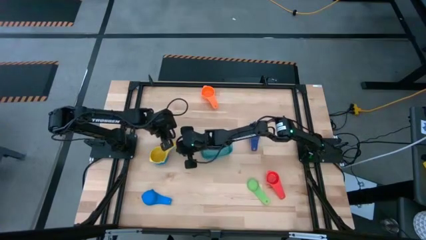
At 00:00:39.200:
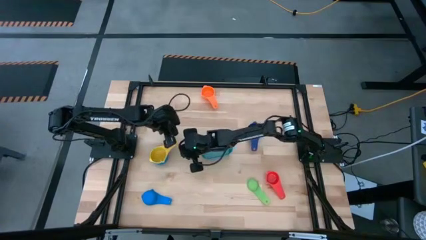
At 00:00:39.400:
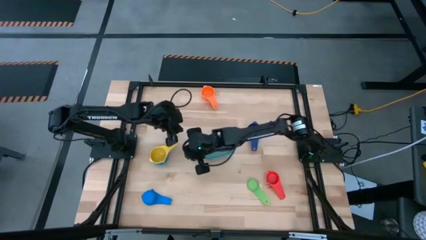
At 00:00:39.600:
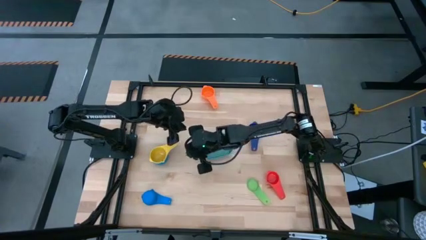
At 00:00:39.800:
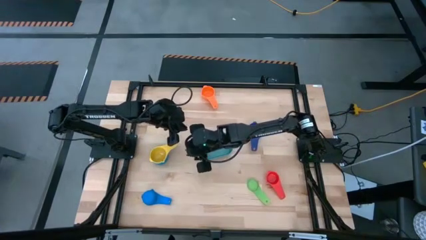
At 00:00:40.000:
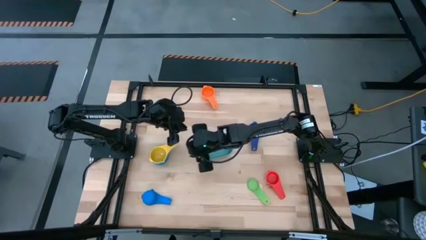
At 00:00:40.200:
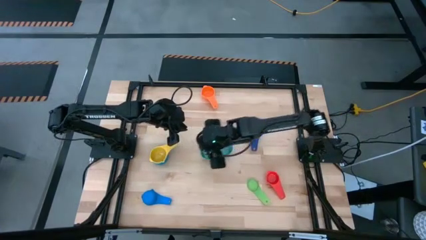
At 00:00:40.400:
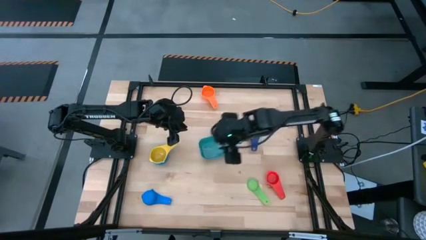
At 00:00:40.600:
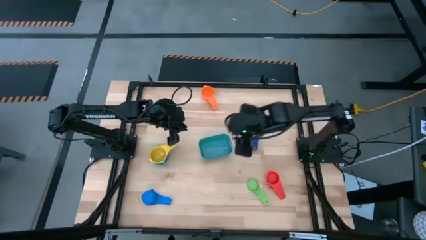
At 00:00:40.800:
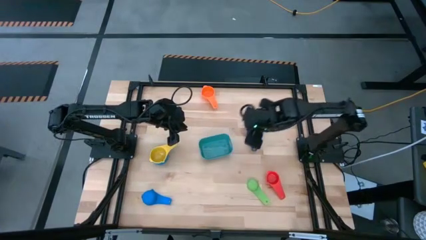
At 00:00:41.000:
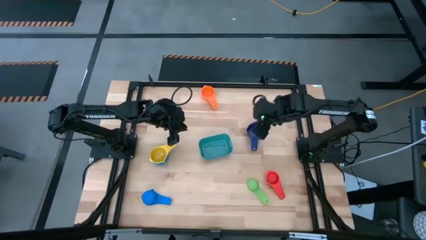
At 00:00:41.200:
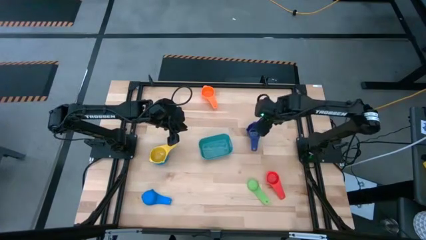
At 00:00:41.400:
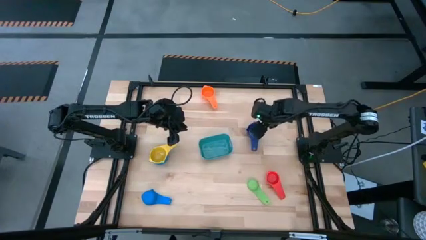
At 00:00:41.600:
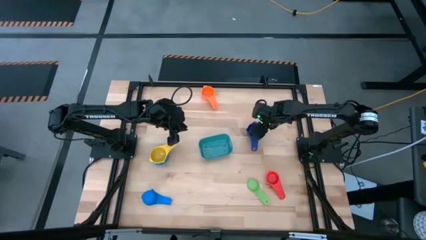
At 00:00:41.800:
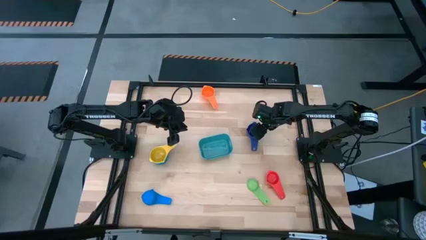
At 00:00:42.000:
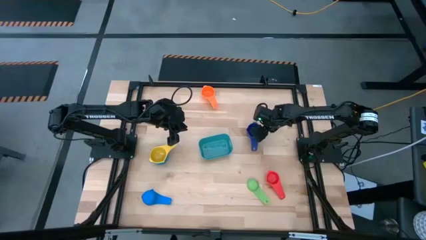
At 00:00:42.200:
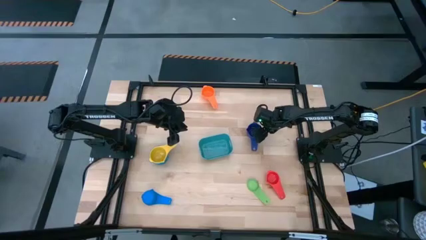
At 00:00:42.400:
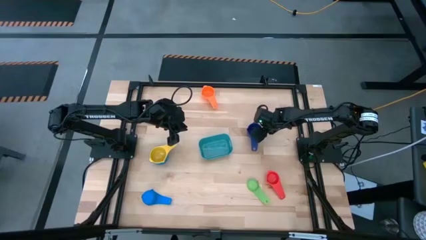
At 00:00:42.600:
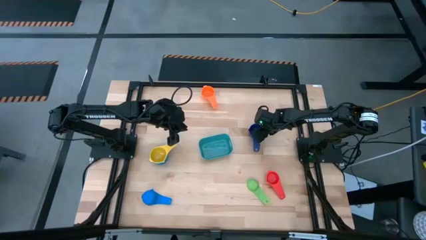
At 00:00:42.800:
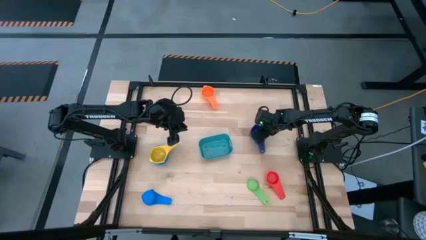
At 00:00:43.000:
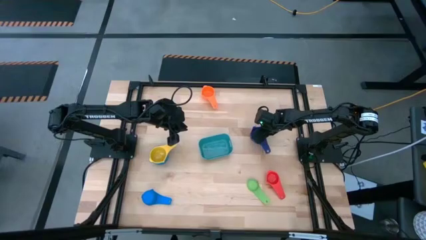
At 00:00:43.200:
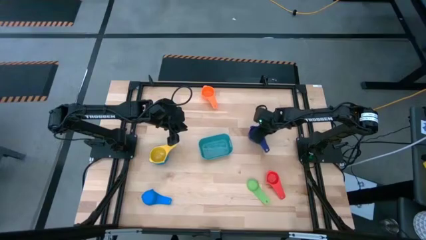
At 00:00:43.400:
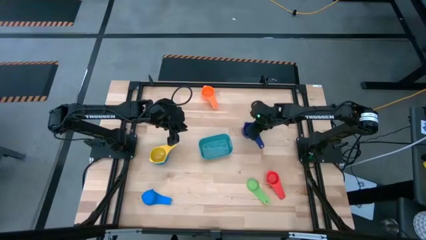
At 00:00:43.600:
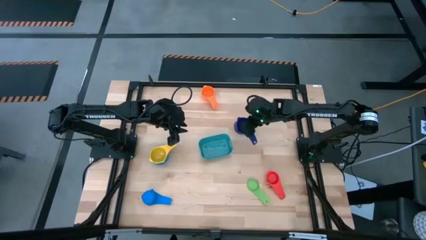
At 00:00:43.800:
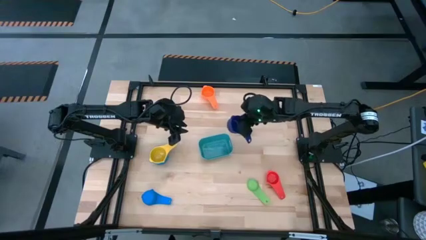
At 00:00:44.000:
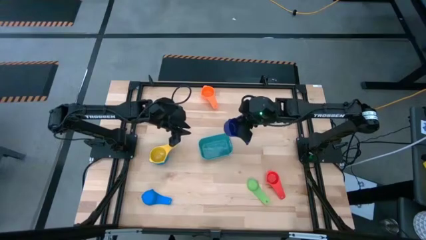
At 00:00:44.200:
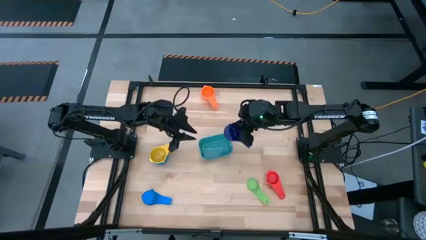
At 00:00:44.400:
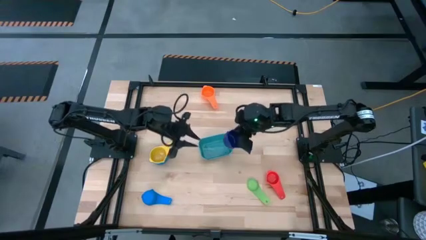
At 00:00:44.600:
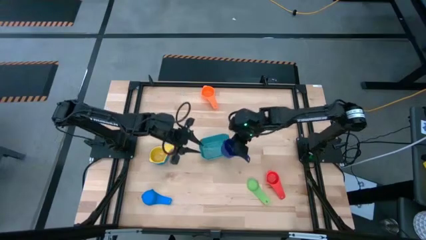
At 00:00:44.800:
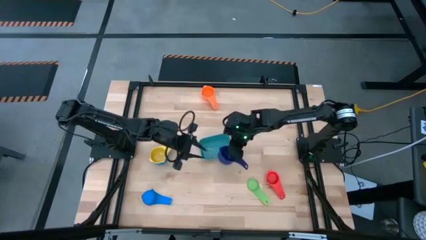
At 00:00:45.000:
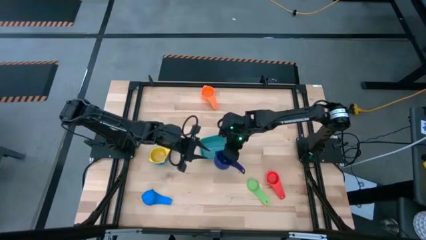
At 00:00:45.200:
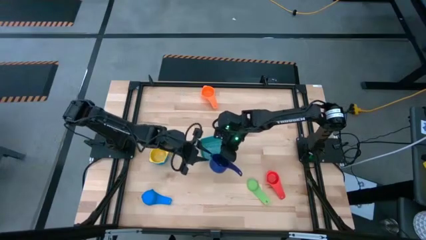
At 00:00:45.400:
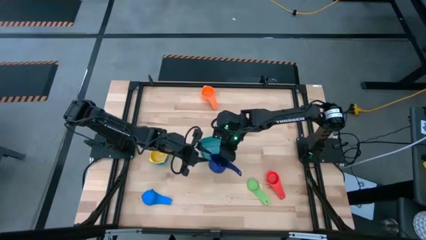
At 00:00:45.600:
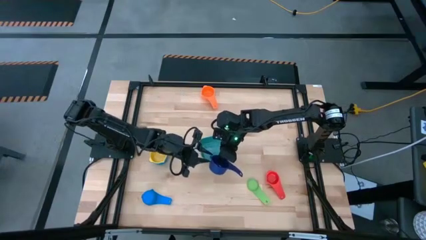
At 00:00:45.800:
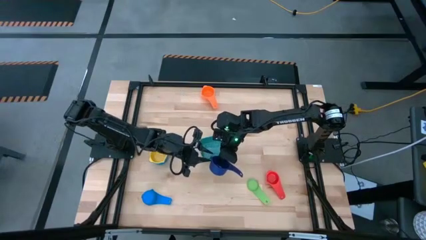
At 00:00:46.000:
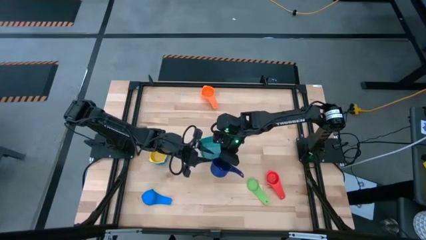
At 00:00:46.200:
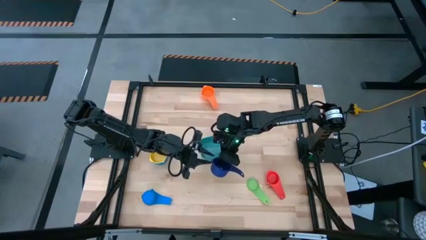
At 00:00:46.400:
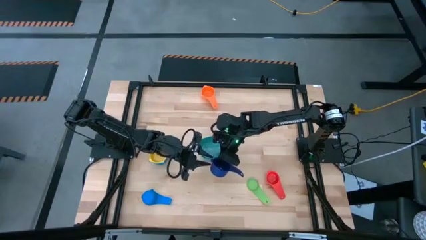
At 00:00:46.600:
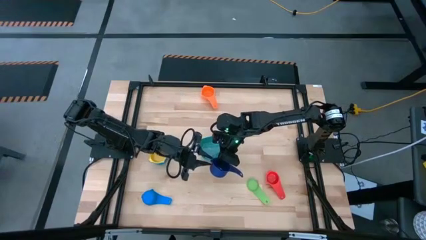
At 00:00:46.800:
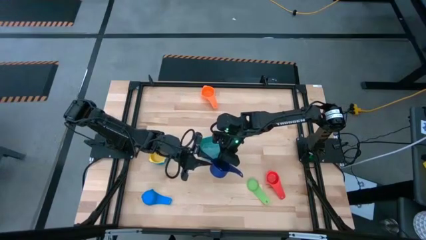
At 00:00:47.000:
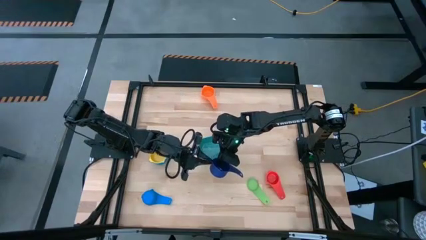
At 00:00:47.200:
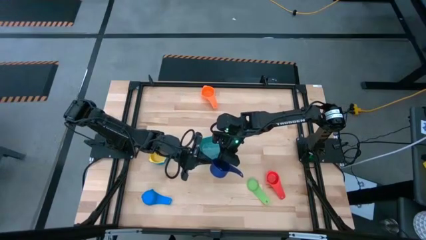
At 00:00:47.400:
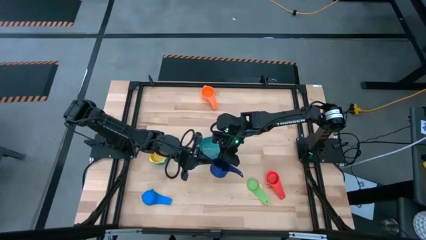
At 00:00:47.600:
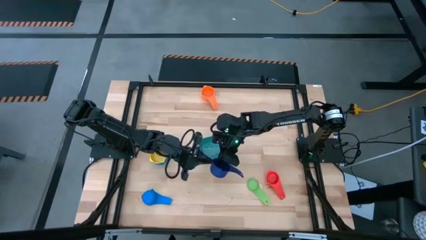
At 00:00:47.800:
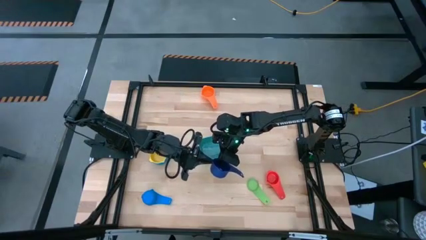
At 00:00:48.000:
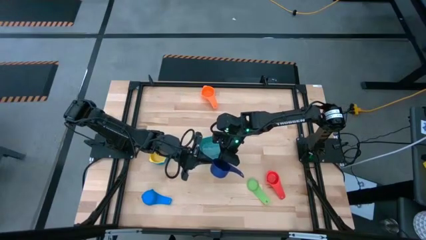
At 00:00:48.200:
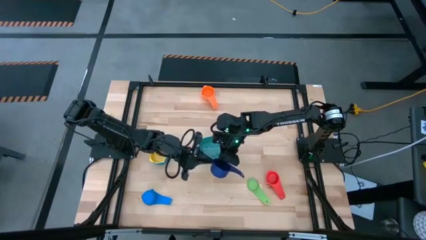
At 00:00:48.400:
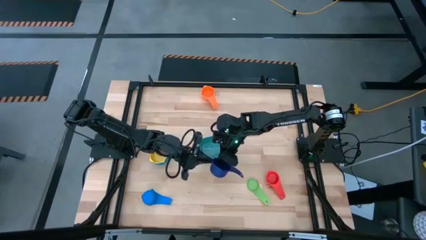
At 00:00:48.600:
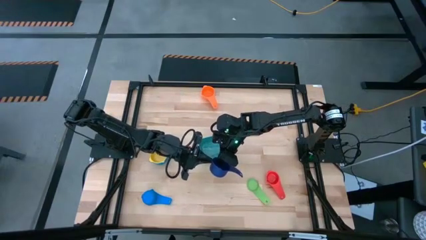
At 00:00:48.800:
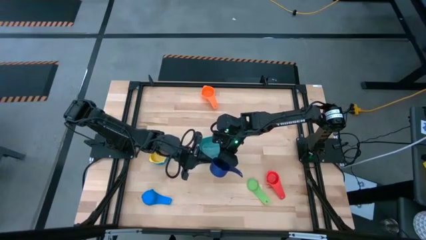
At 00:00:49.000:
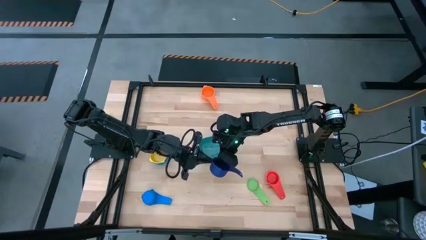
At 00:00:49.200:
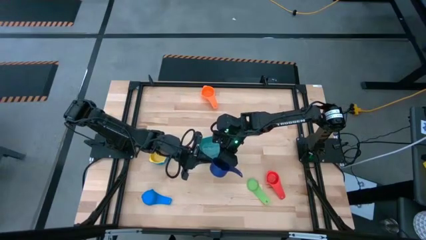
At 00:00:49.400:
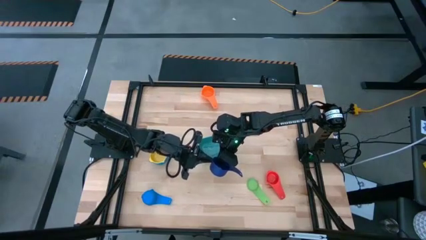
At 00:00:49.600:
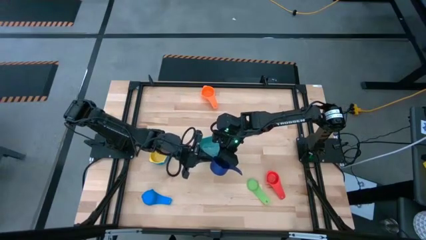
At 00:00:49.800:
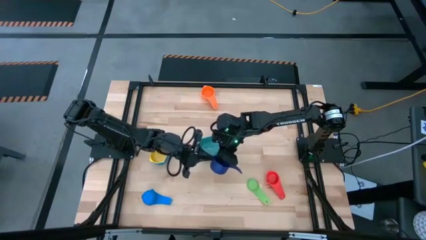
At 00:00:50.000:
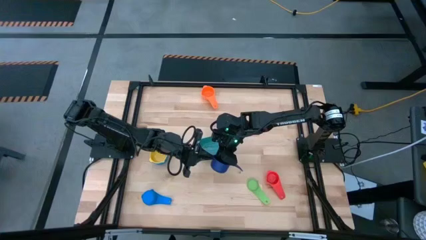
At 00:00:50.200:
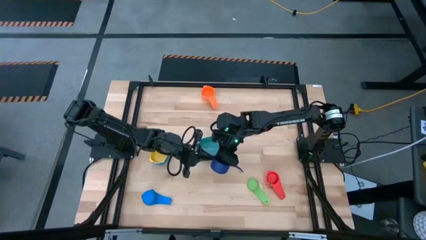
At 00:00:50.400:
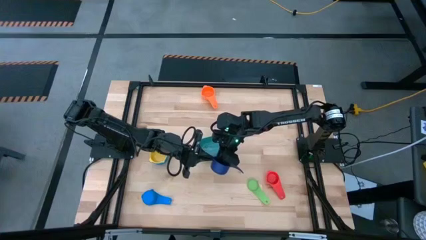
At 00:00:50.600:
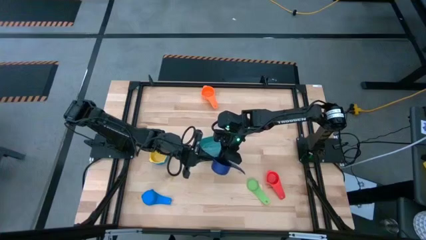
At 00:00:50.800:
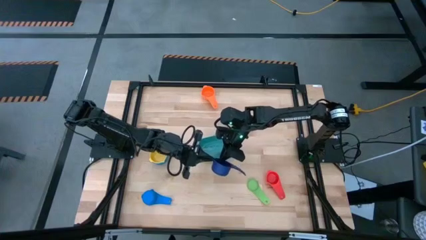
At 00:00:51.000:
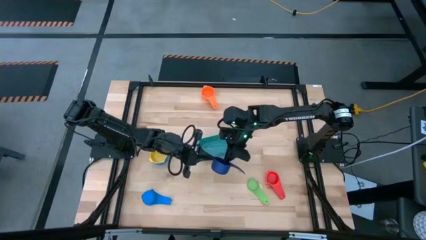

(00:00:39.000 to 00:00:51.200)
Task: Nest measuring cups in basket
Stack the dark blue measuring cup on top of the yellow measuring cup
